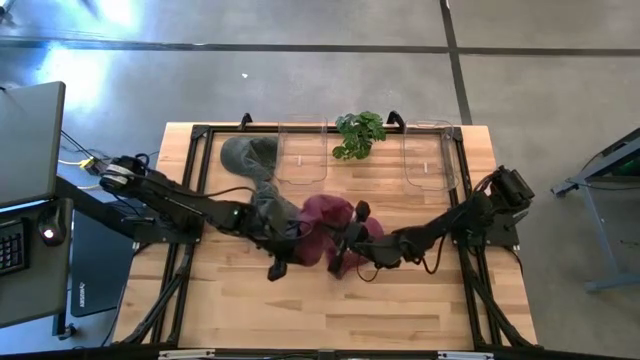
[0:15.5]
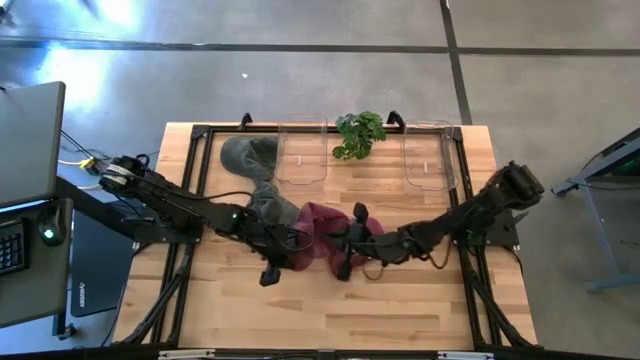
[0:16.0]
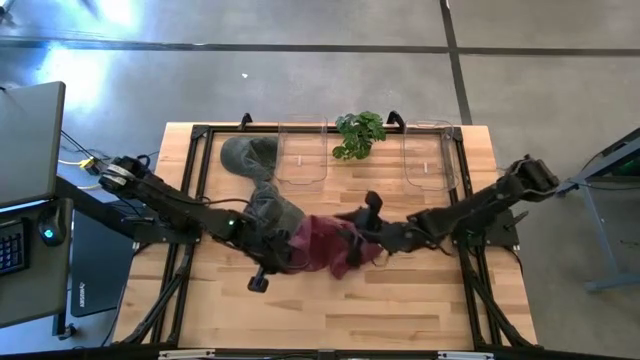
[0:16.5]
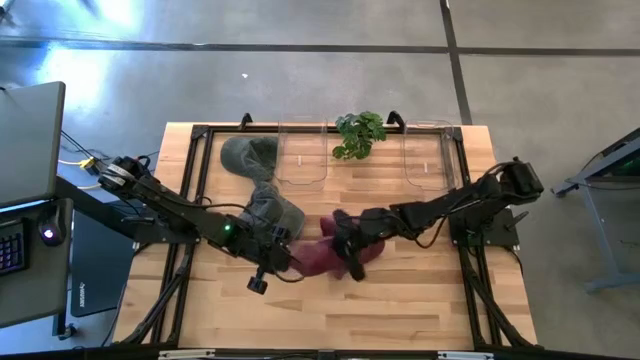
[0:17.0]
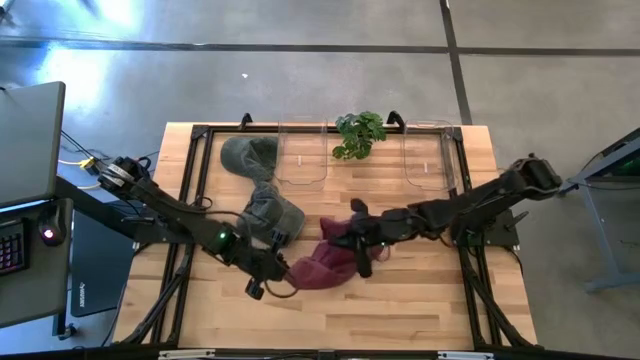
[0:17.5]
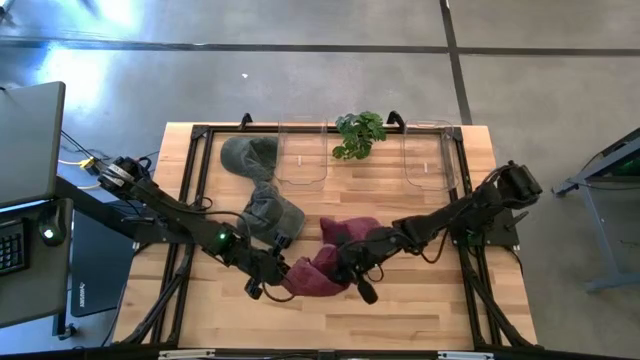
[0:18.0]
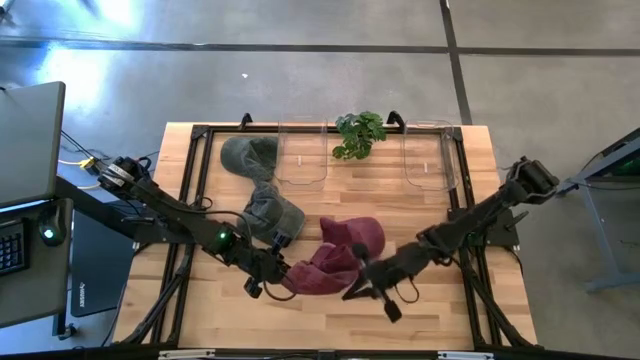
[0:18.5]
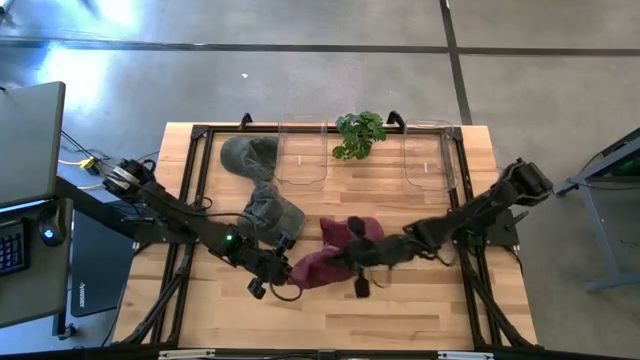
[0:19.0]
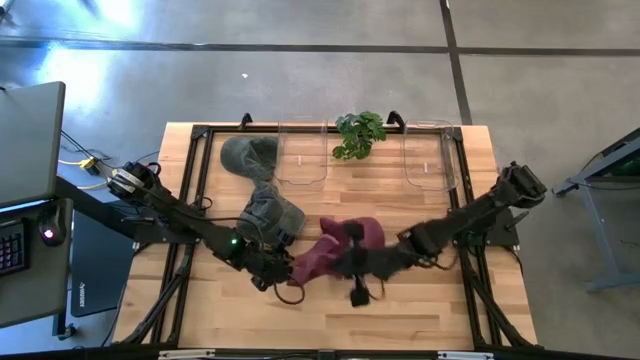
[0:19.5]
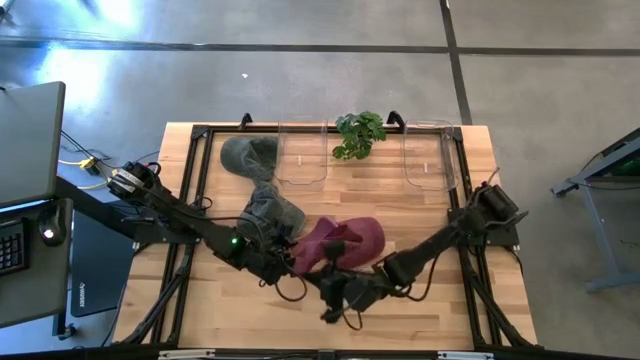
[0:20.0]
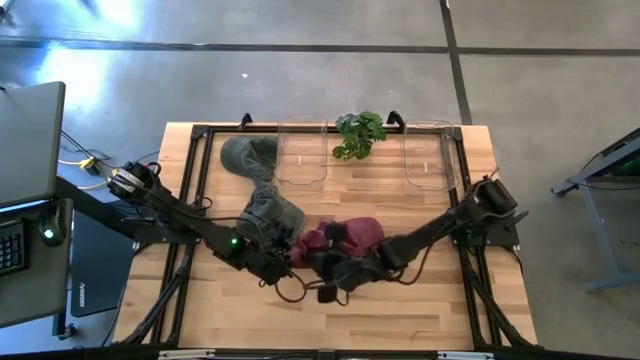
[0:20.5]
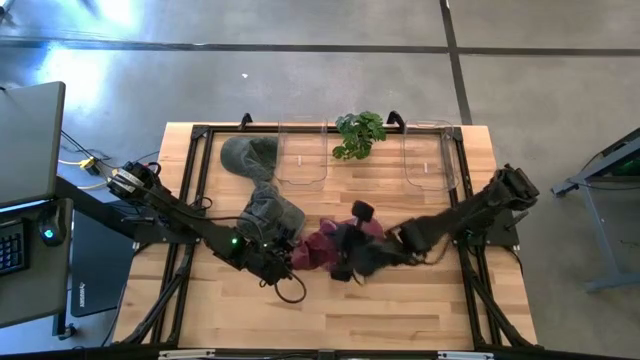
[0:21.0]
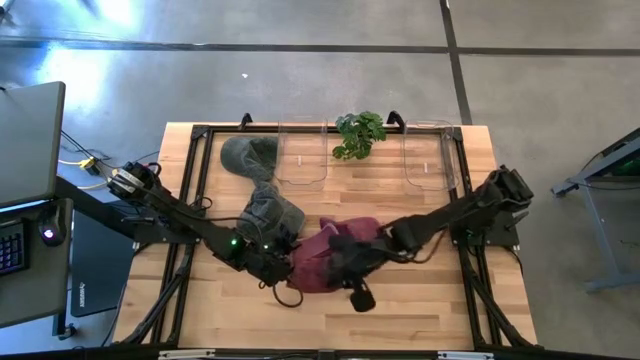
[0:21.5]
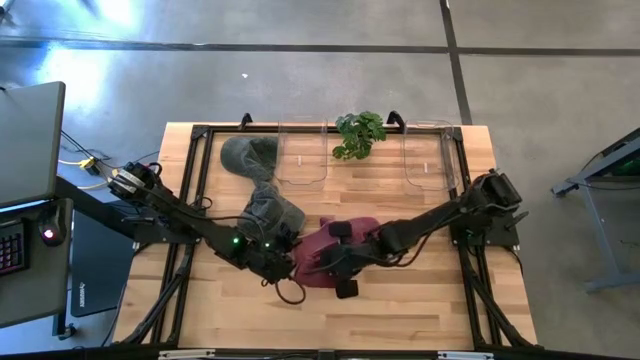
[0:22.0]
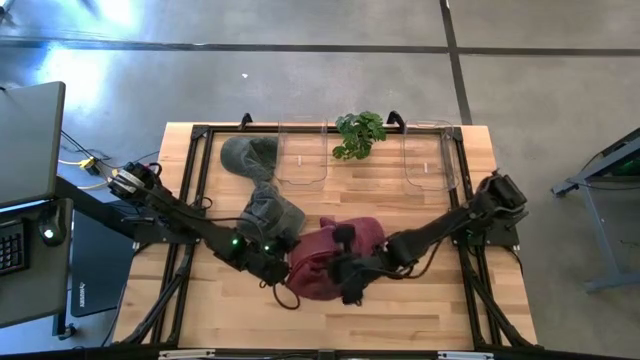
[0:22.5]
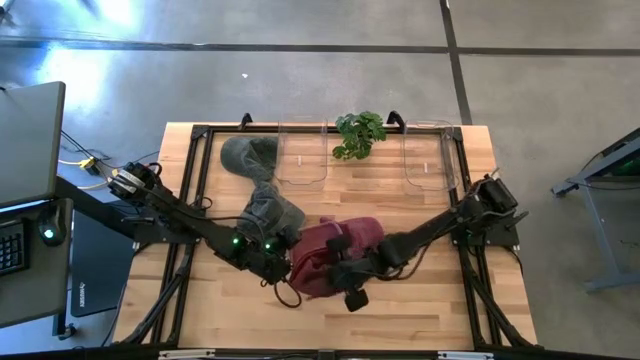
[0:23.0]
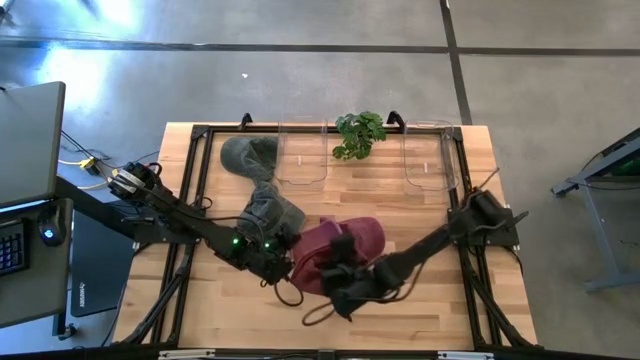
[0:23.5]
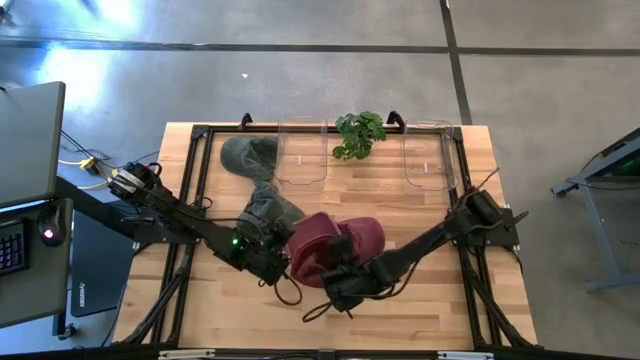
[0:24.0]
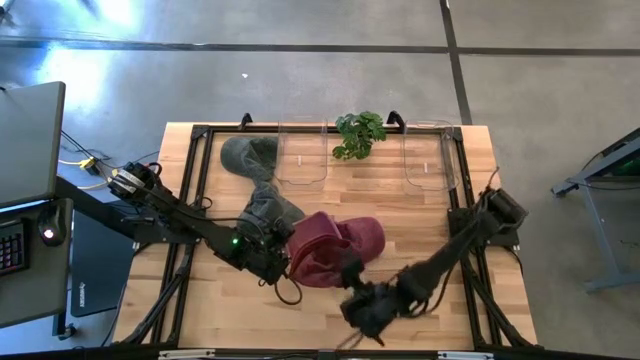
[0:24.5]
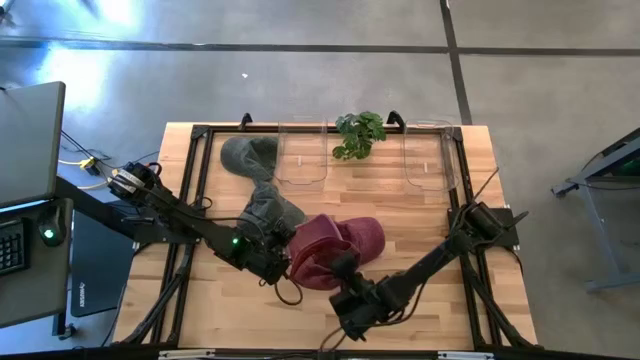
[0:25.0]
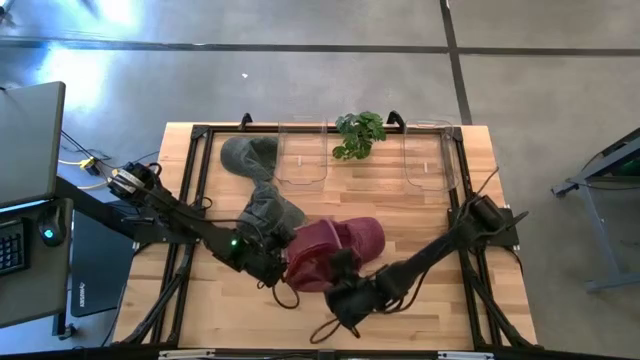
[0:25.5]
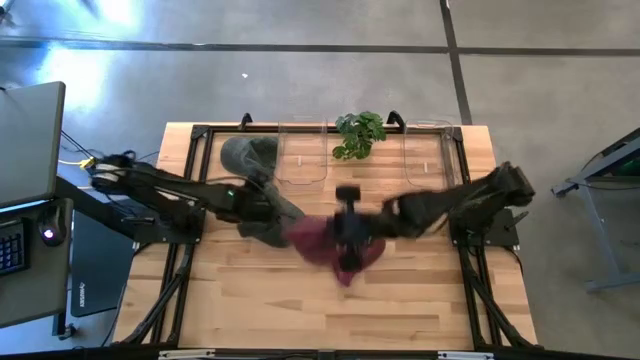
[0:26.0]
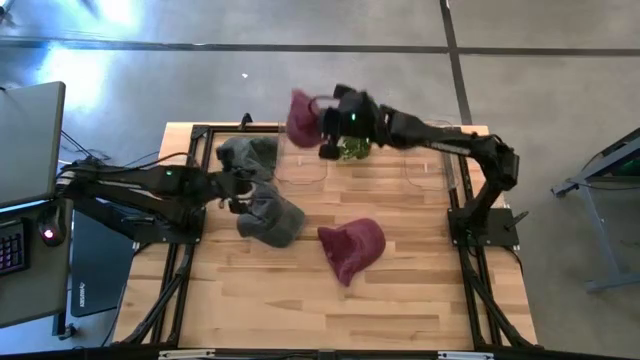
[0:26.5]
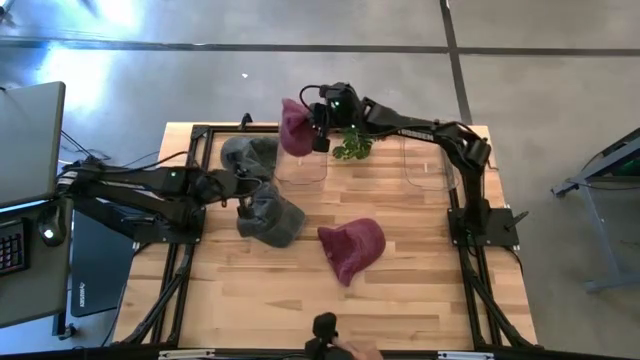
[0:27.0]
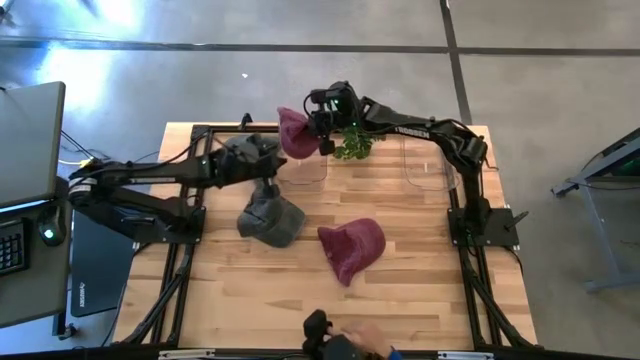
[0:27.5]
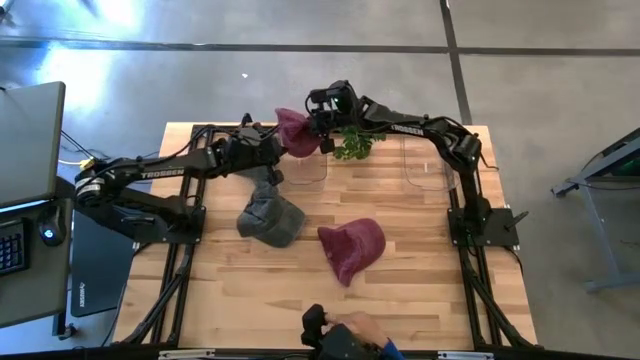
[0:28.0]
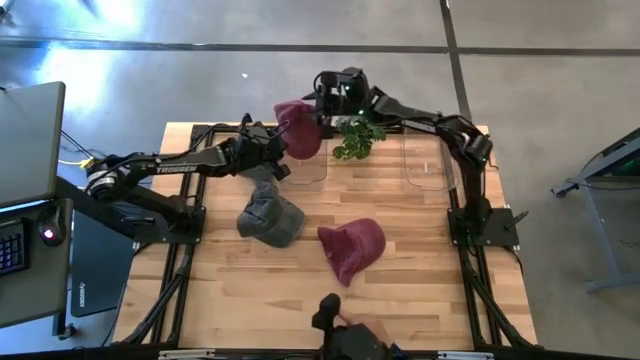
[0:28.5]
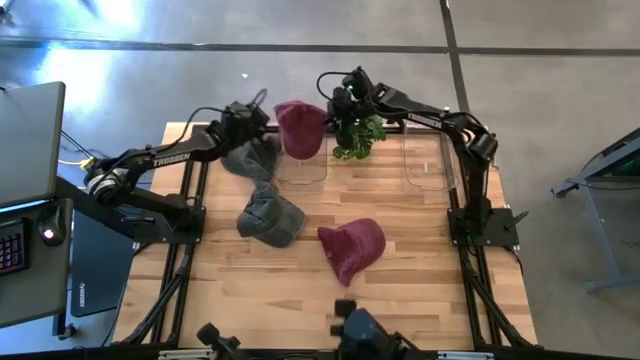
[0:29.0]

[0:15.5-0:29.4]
Task: Pick & Place hat
Put the left red cap into the left transparent bin

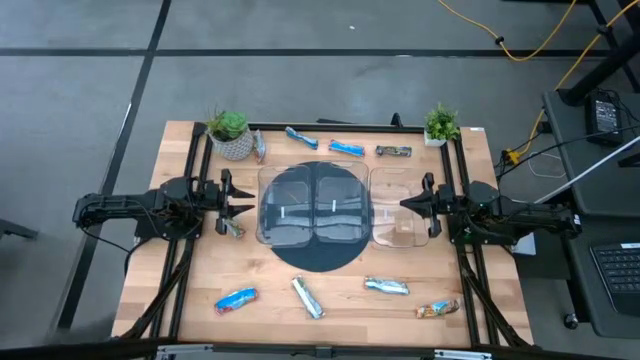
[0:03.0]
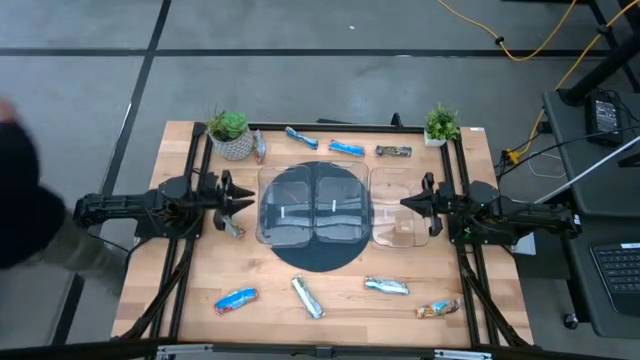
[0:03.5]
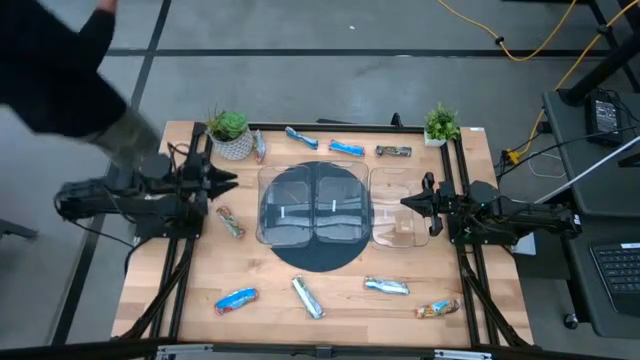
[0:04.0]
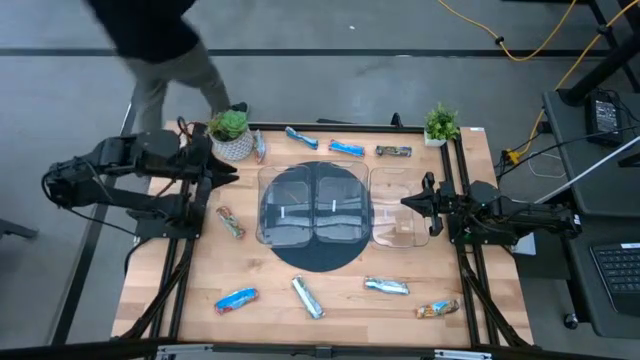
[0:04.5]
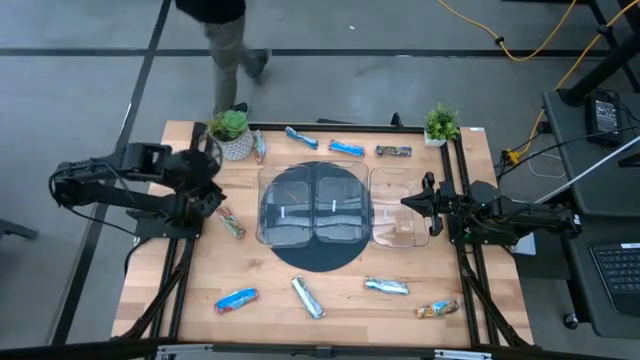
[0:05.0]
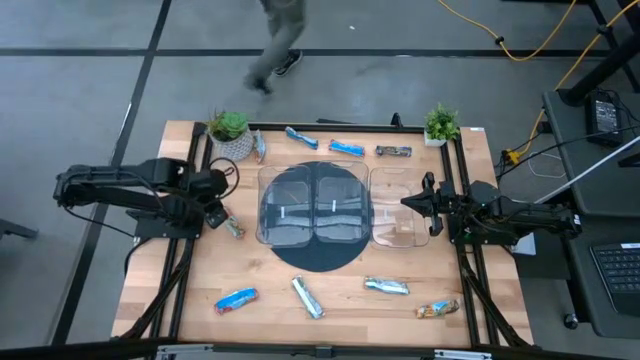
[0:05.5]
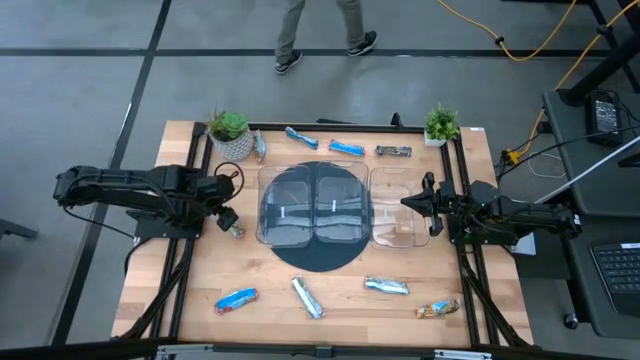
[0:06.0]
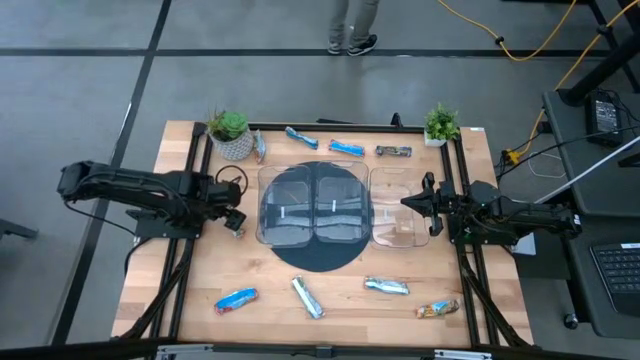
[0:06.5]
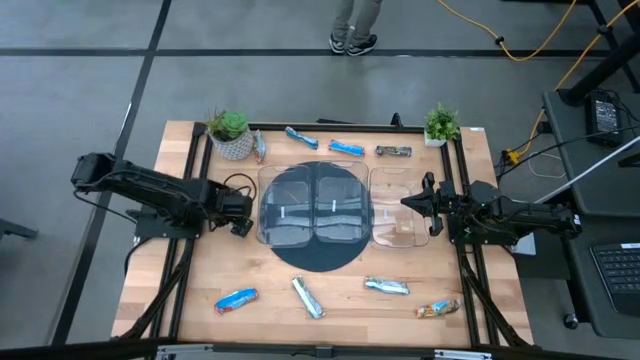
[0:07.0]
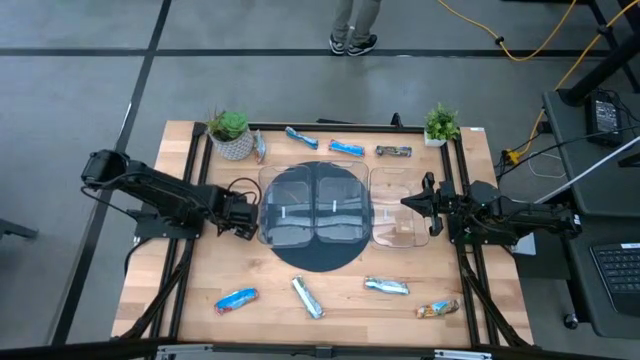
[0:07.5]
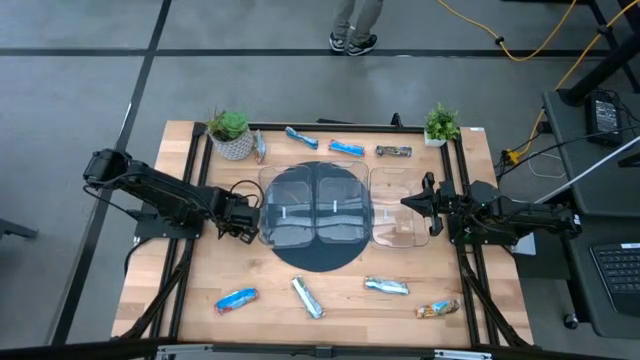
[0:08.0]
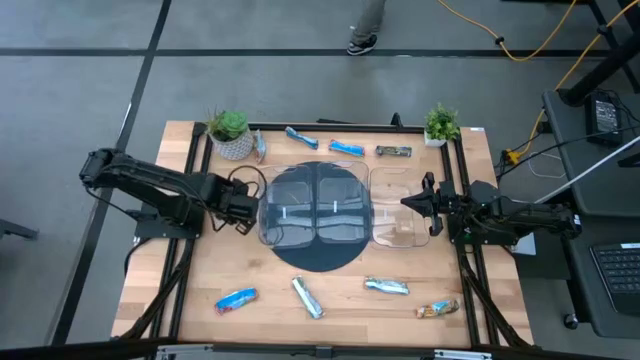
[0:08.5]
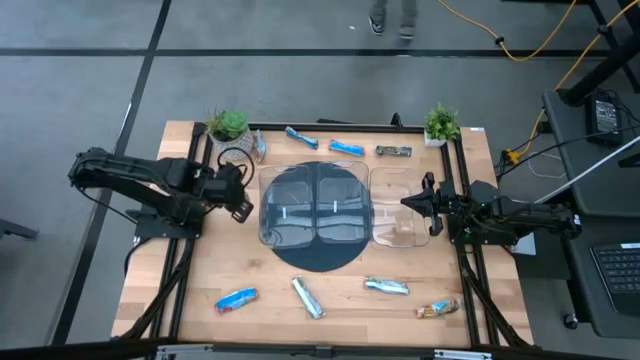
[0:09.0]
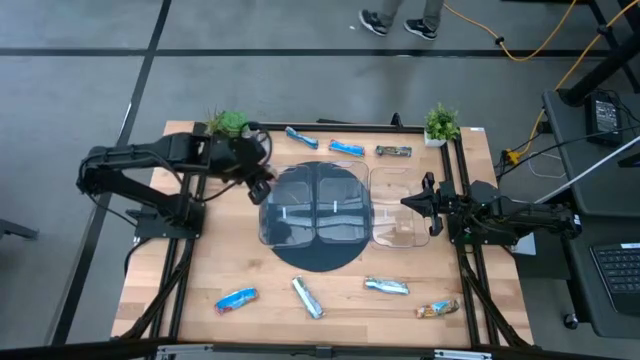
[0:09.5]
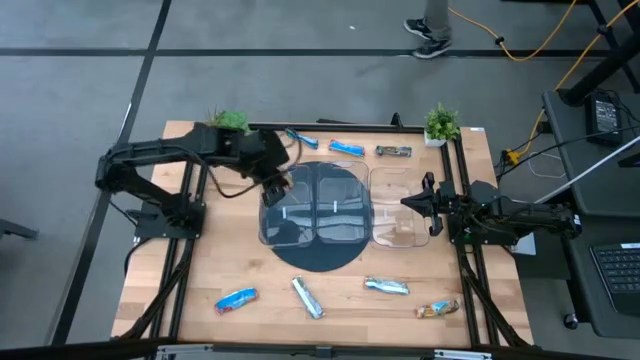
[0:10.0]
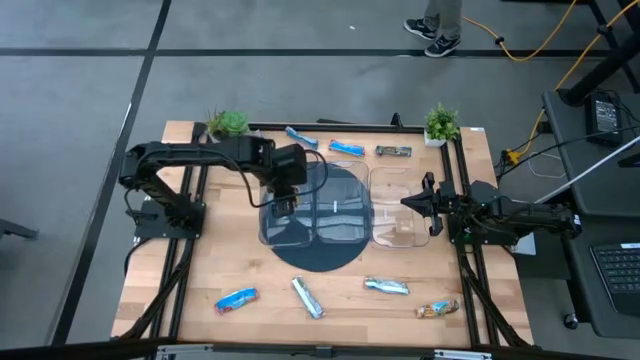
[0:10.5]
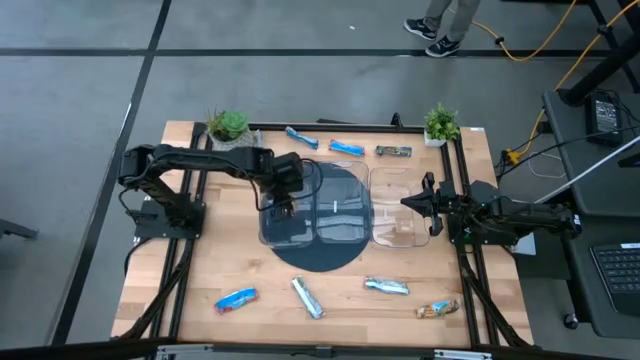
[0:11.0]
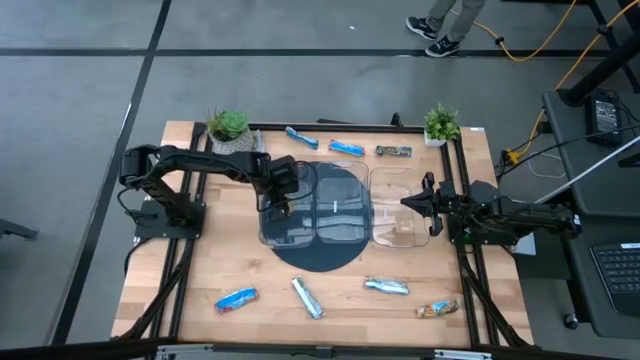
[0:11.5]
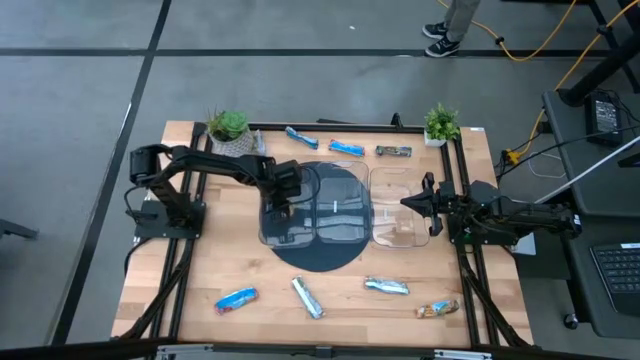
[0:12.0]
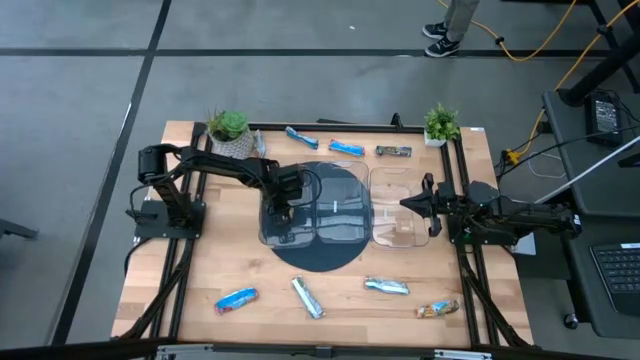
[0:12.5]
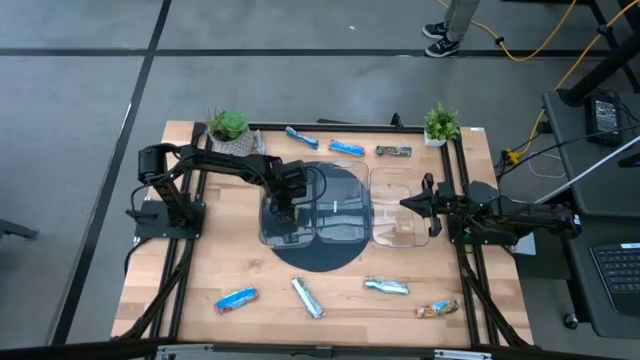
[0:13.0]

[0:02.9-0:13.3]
Task: Pick and place Granola Bars by type
Put the red granola bar into the left transparent bin
